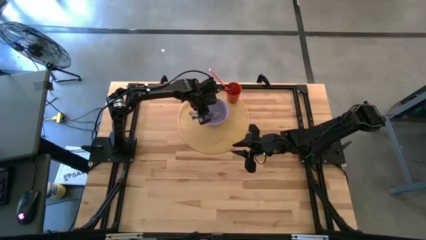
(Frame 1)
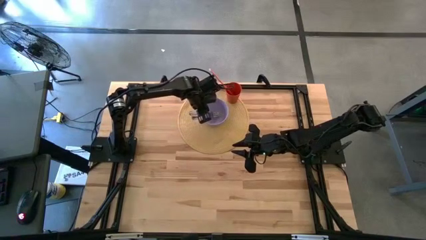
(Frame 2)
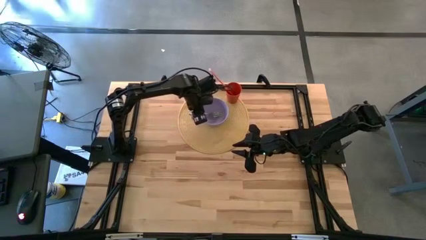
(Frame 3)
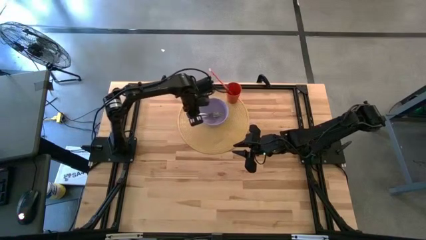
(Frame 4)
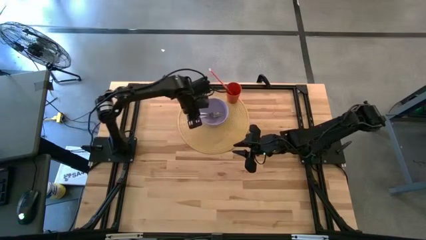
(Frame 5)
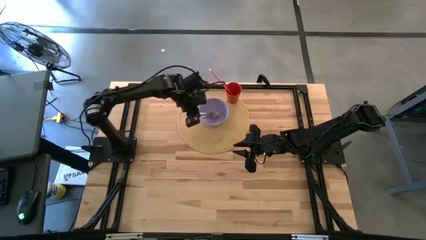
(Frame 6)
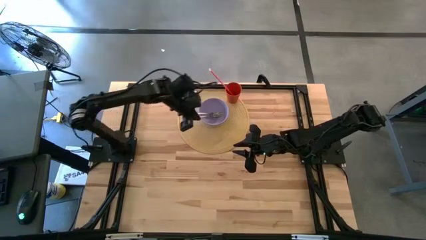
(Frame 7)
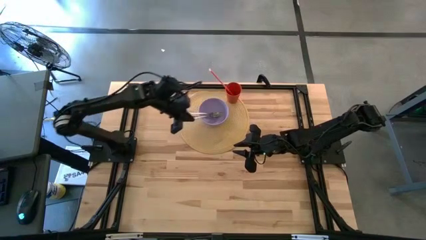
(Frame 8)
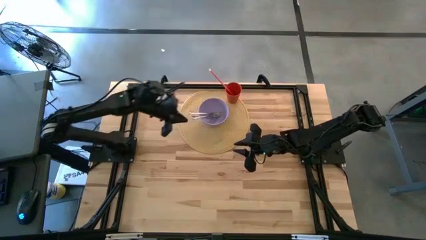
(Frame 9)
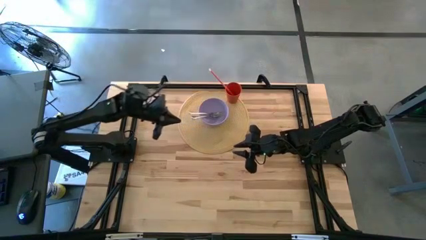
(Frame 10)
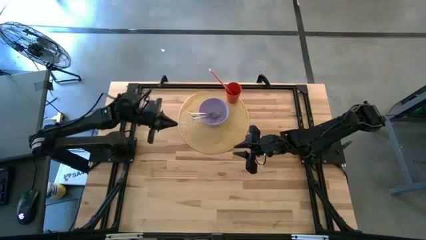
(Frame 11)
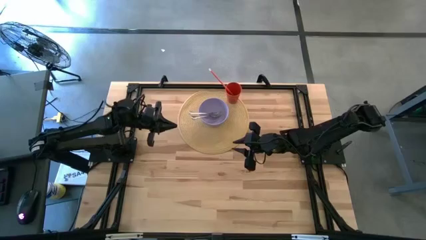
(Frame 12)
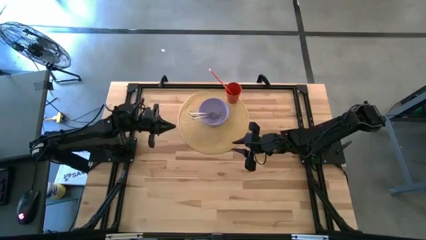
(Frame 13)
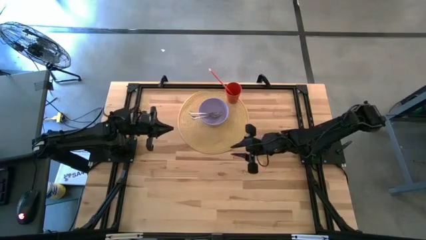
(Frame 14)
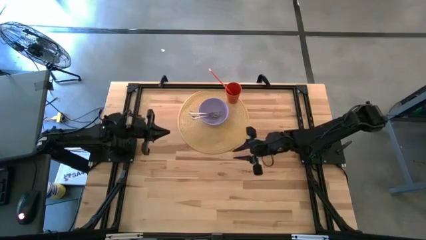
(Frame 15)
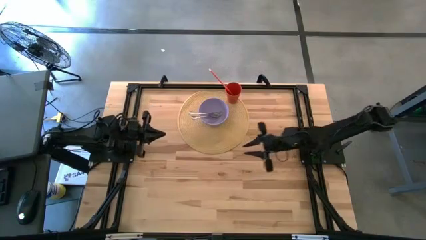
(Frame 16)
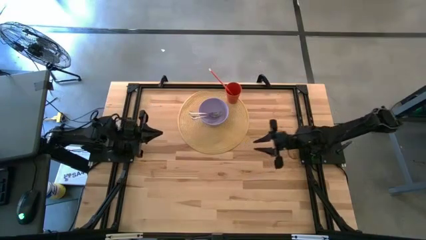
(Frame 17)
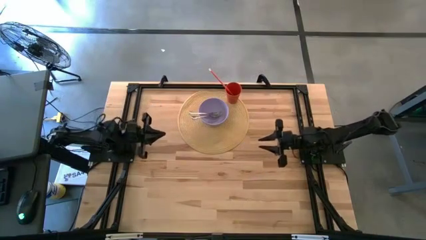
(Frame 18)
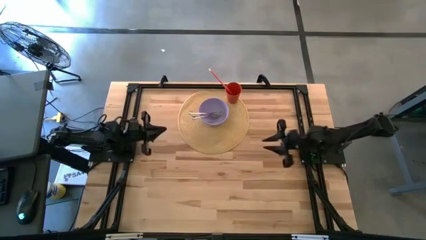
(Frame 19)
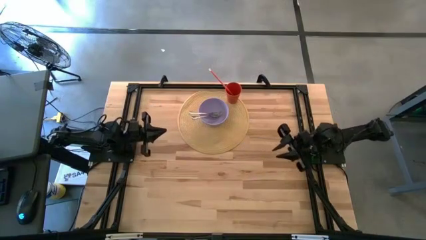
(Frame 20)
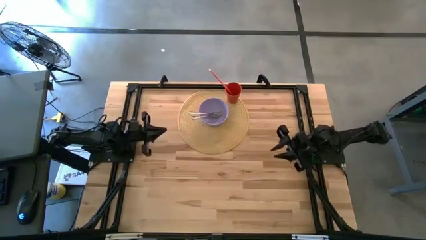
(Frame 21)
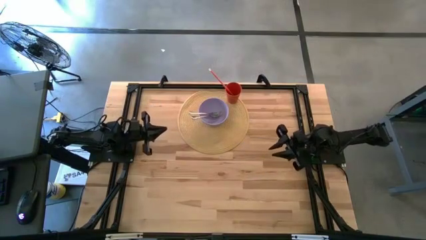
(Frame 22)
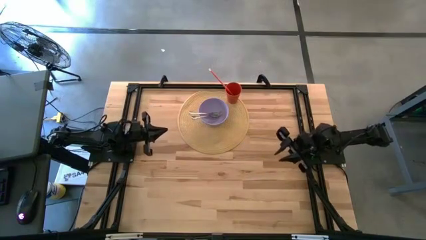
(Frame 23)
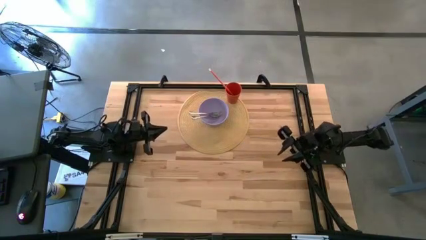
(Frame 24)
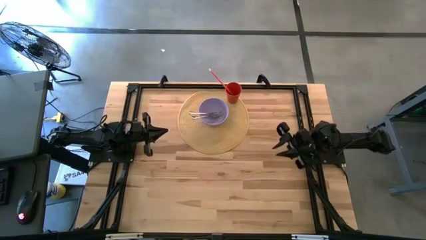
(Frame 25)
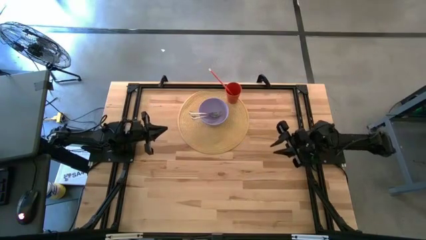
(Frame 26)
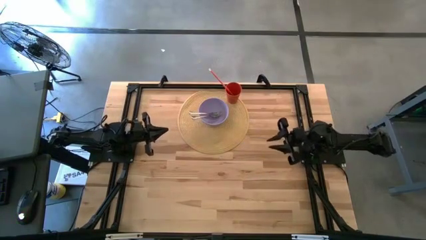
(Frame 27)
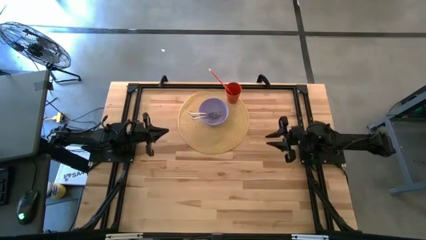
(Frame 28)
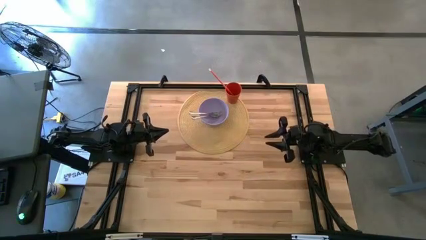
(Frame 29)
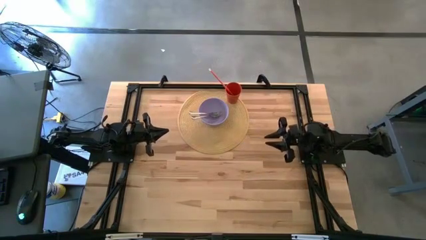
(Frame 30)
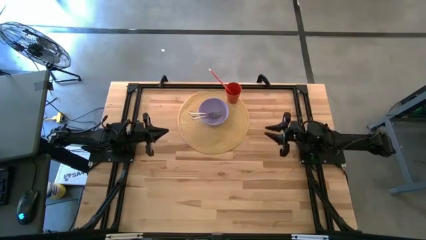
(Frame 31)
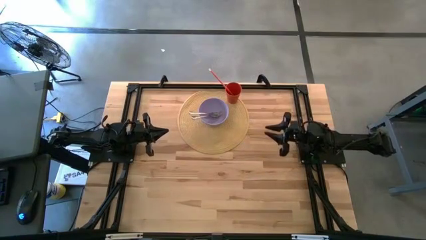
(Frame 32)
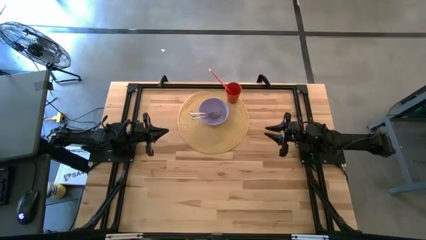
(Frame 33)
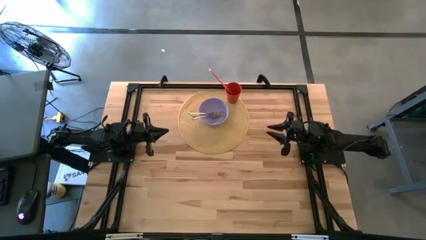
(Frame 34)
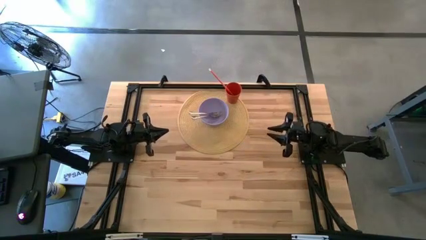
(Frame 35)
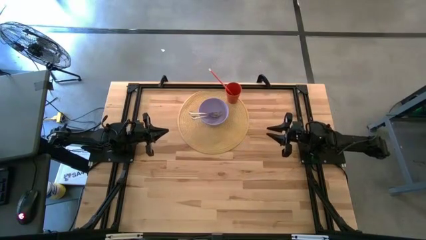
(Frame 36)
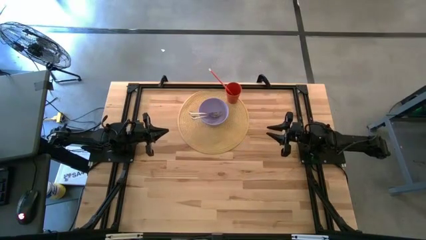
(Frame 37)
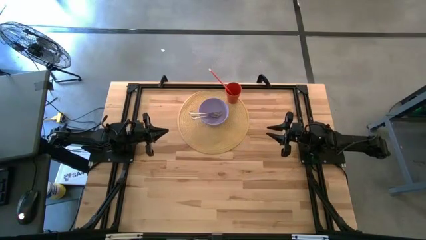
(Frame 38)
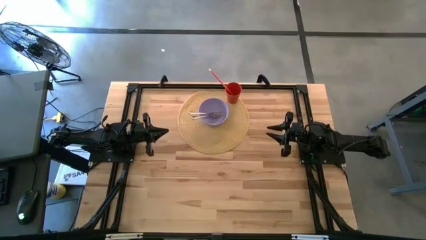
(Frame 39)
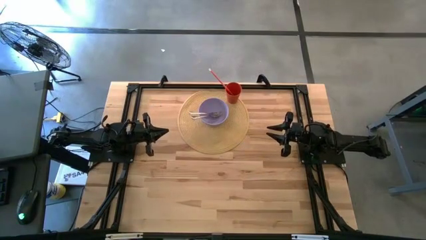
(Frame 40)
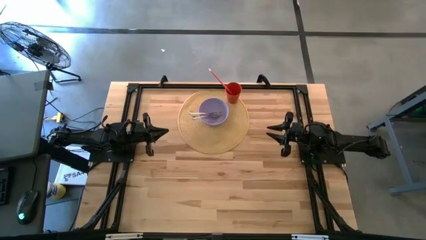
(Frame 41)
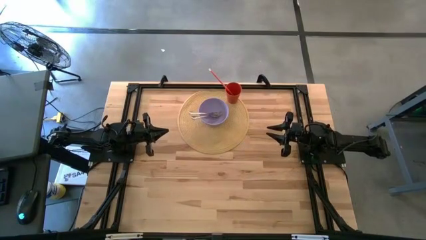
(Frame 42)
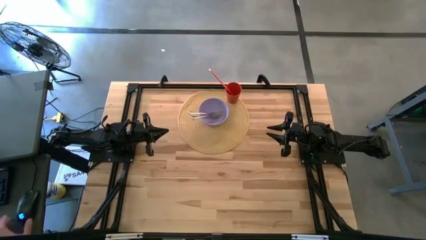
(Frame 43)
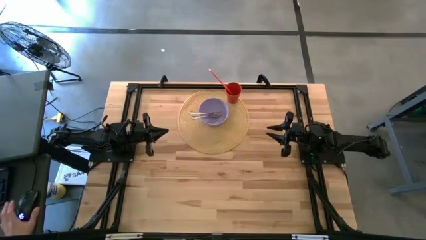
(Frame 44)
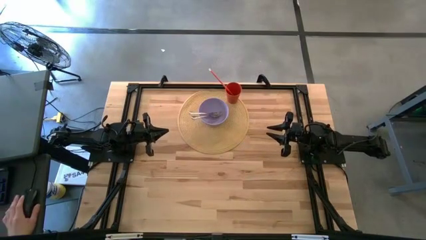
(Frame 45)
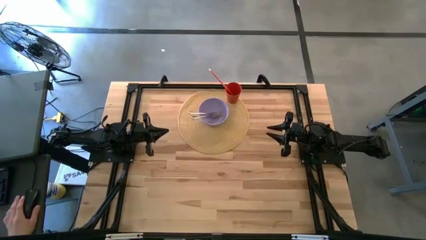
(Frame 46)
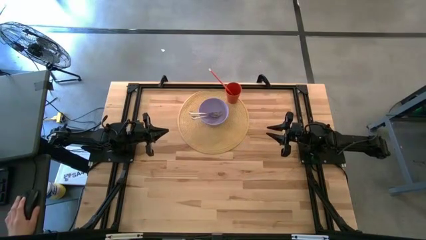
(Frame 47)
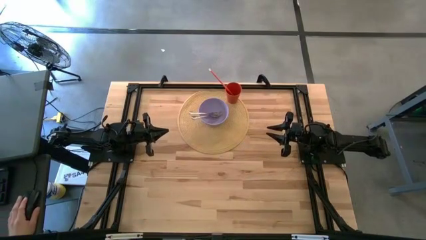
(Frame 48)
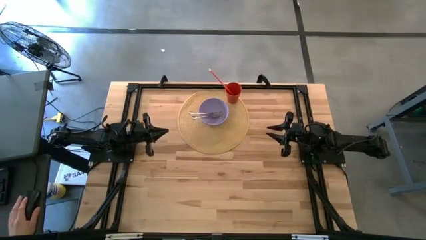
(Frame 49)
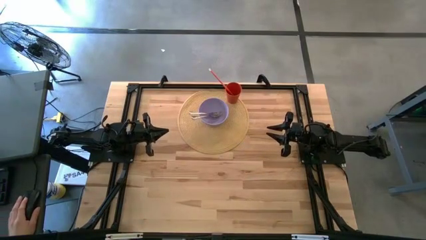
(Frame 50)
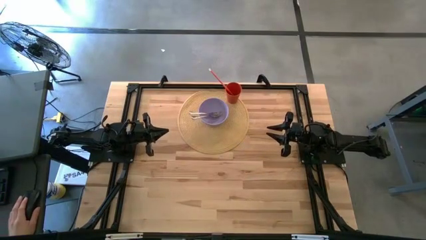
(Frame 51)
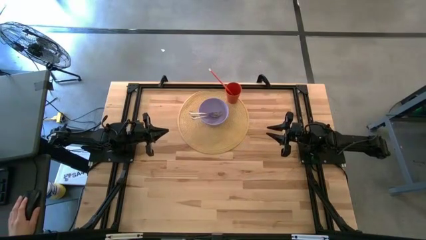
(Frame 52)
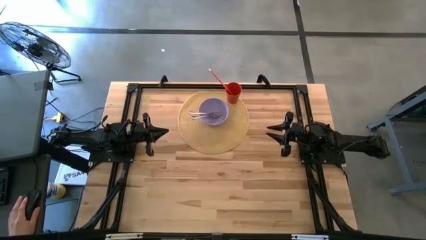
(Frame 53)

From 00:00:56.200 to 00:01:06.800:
Task: Pick & Place Utensil
Return to Home Position
